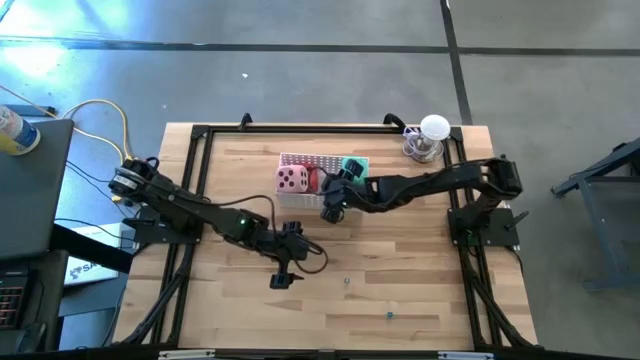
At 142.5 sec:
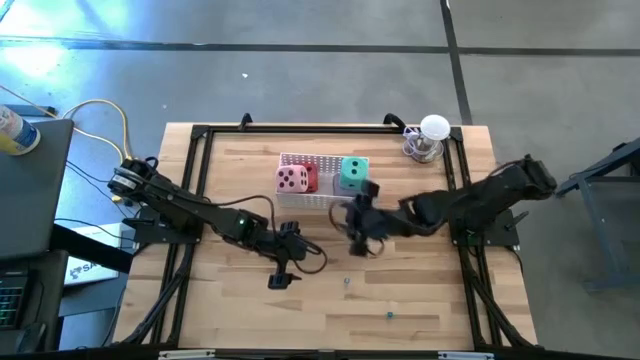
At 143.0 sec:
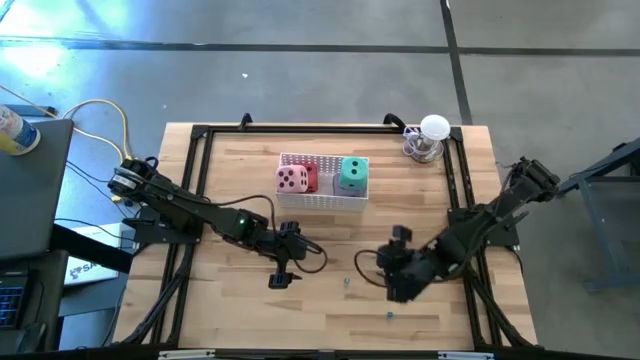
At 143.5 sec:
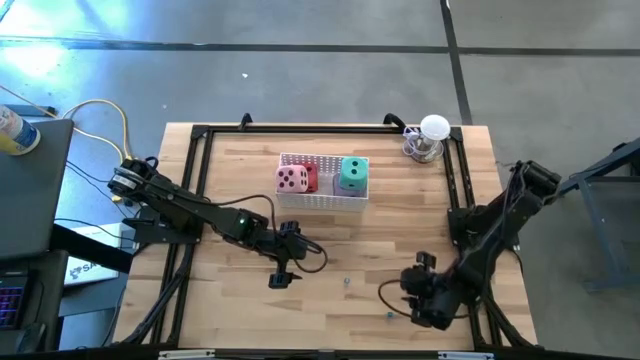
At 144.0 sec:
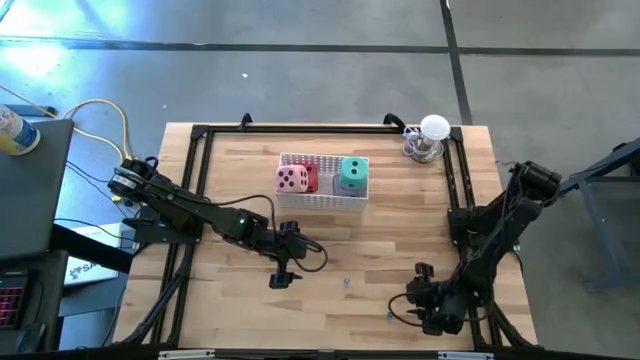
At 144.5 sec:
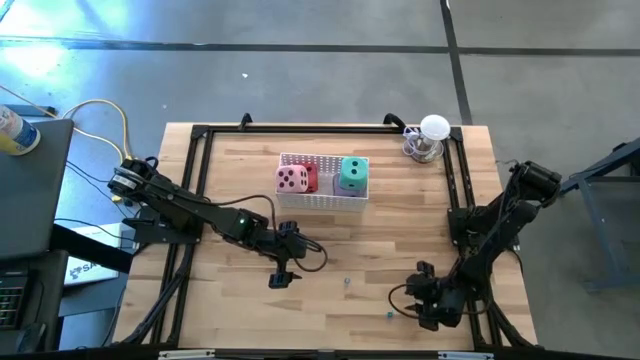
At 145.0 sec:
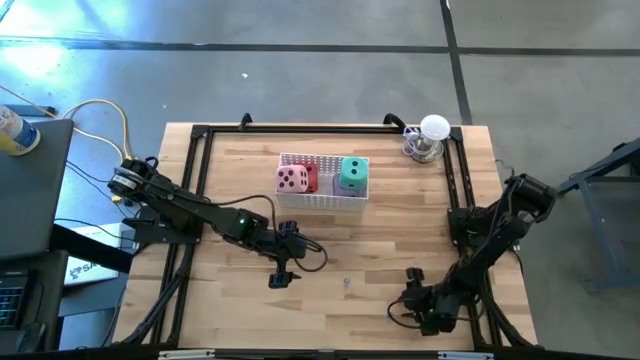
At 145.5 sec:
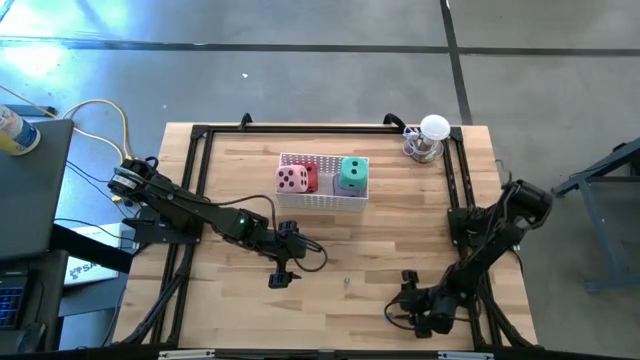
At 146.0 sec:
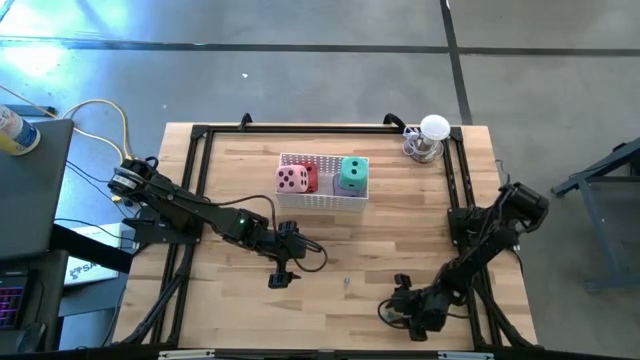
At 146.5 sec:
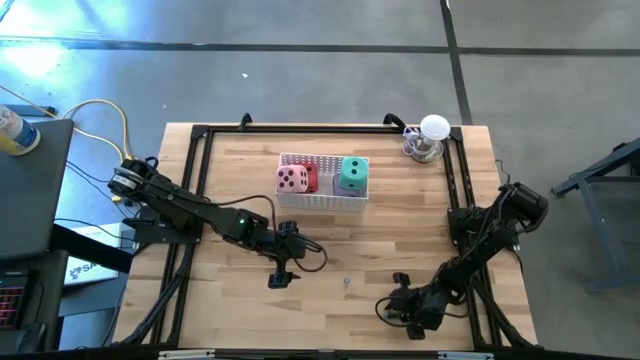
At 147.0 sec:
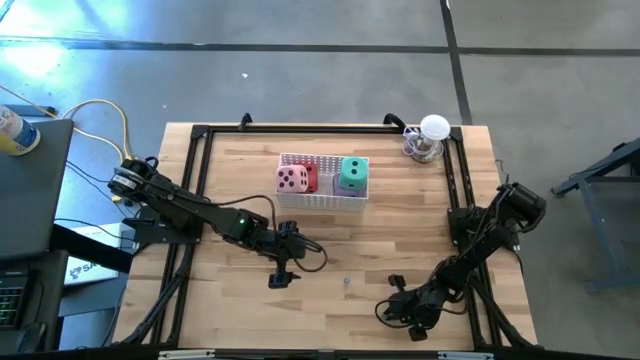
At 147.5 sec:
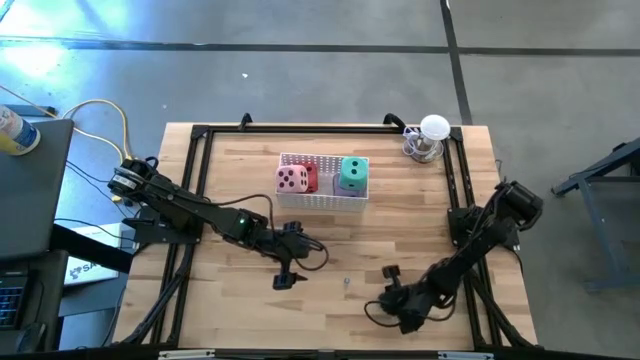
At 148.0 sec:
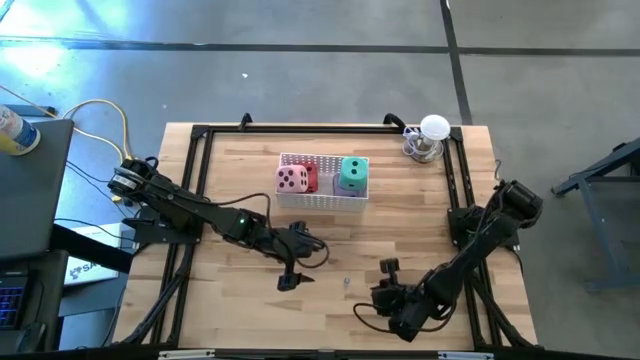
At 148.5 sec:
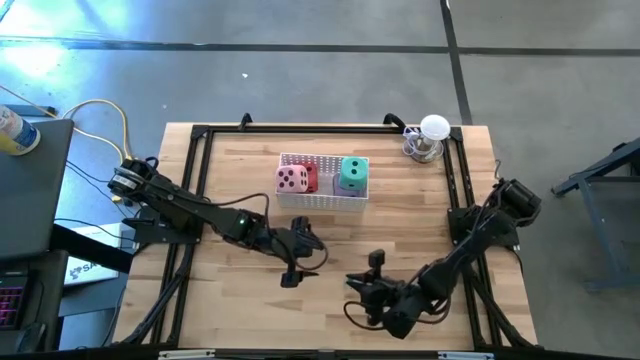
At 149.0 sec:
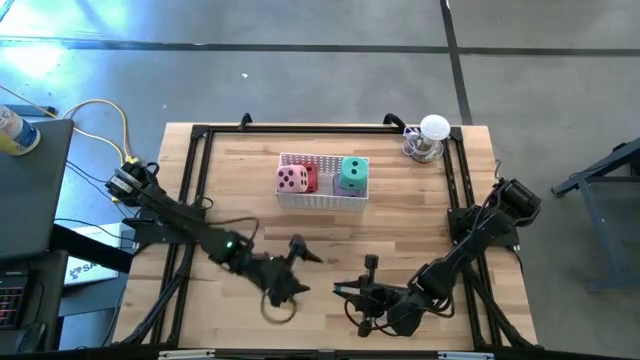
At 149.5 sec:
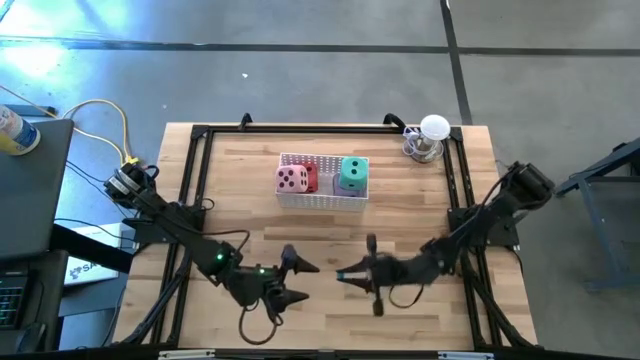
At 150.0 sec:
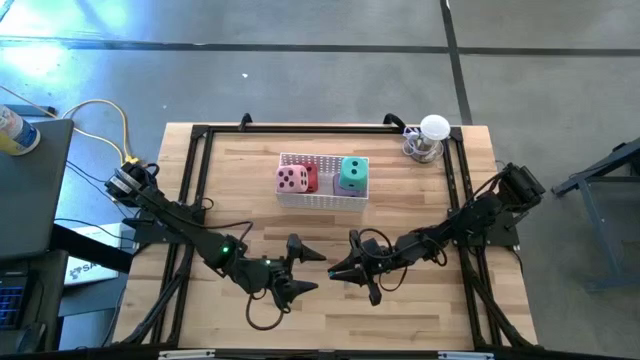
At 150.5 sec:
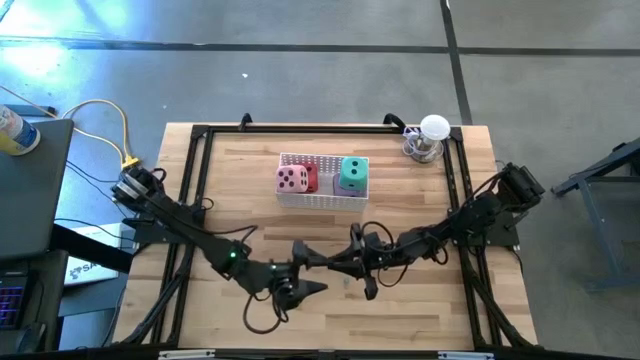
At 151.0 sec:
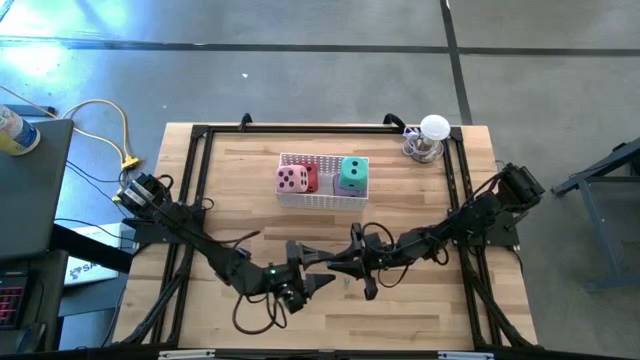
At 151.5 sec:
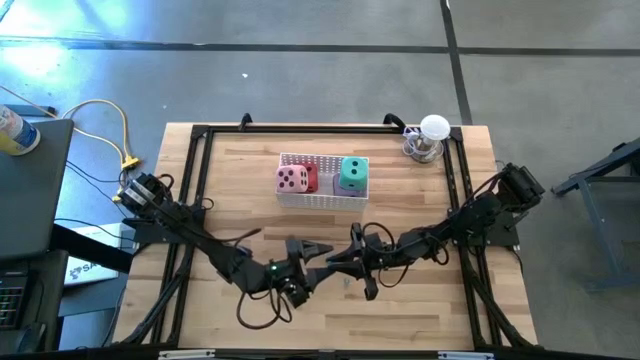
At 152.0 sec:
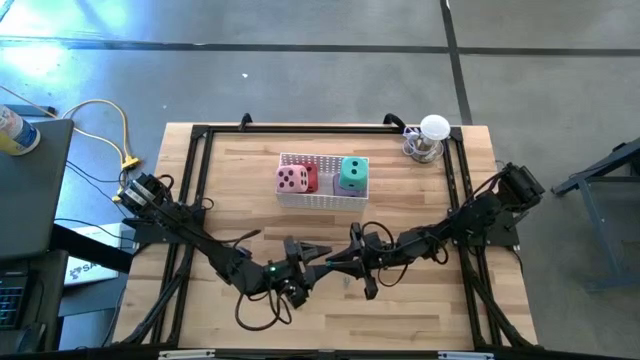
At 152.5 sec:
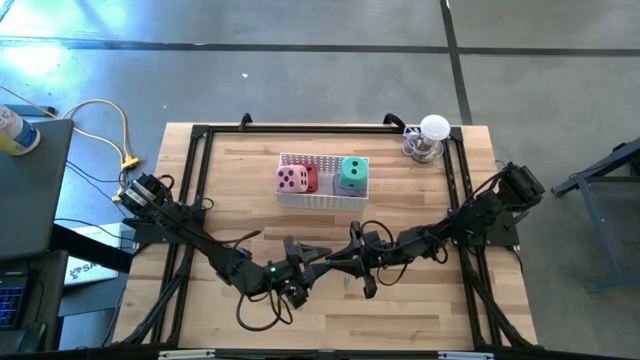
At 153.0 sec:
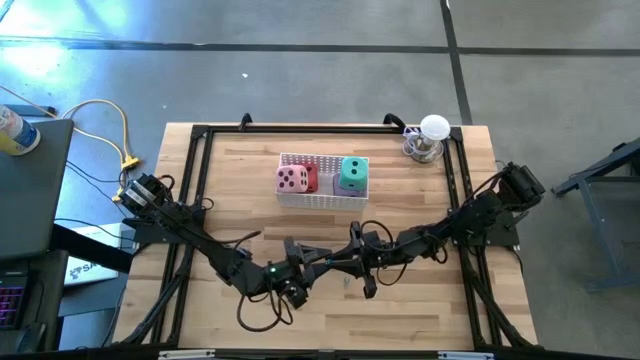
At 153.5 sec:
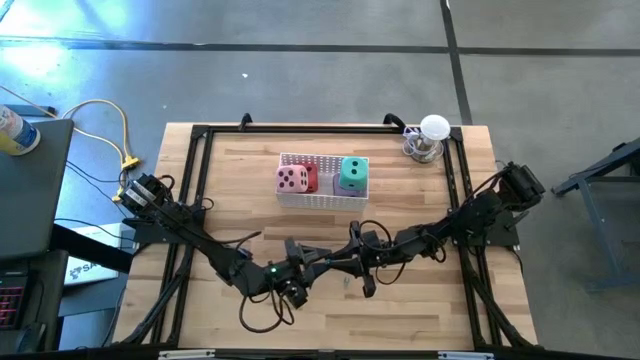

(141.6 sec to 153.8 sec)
Task: Pick & Place Dice
Put the small light blue die into the white bin

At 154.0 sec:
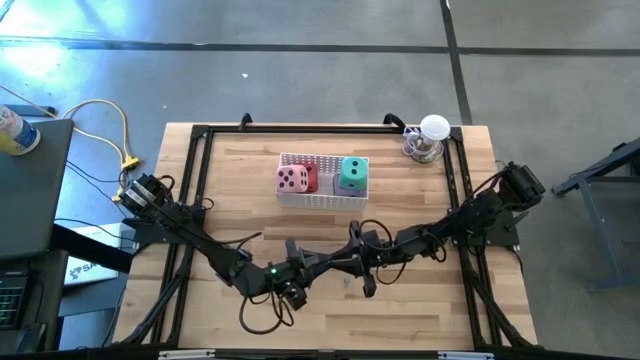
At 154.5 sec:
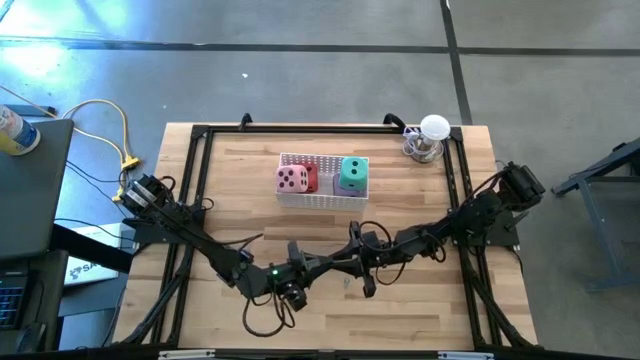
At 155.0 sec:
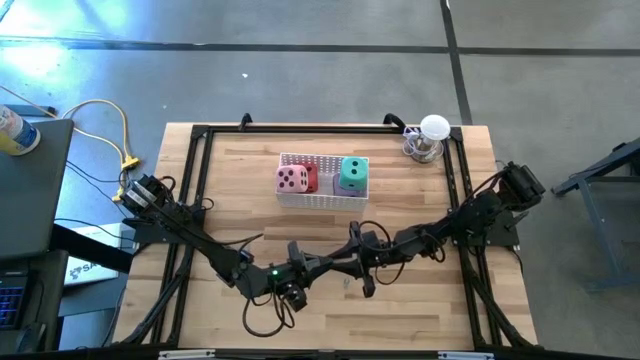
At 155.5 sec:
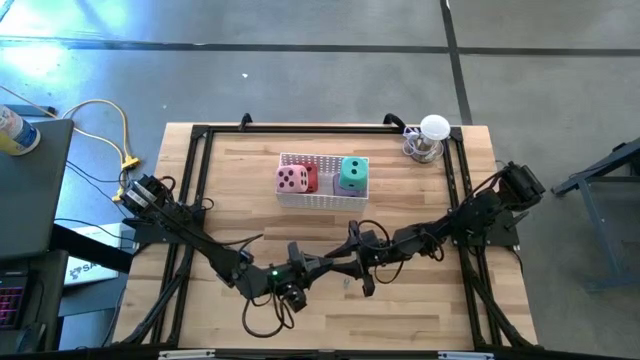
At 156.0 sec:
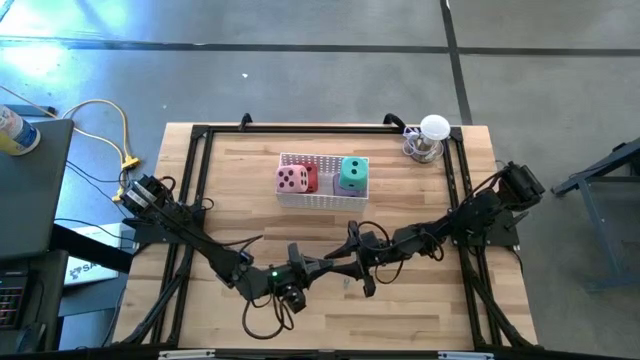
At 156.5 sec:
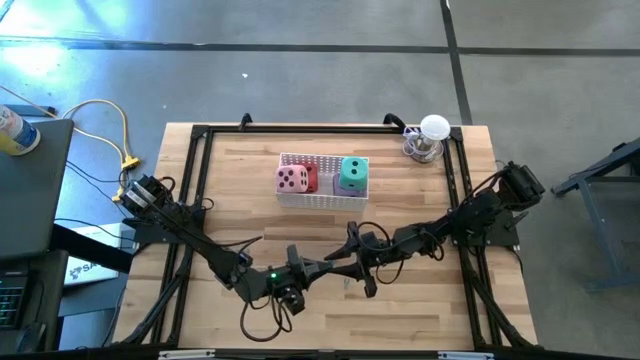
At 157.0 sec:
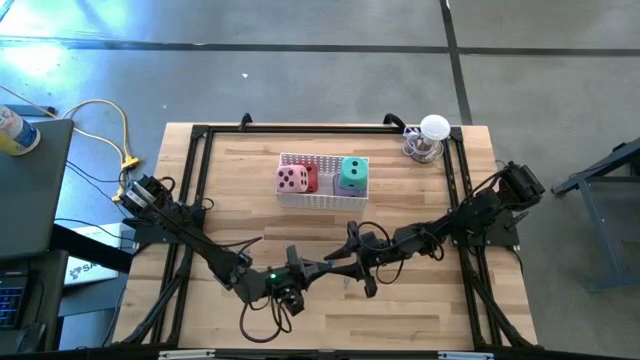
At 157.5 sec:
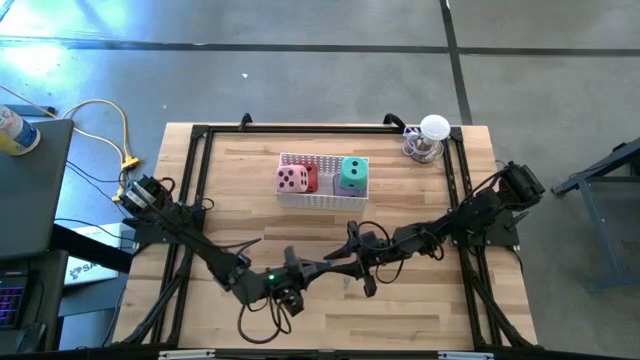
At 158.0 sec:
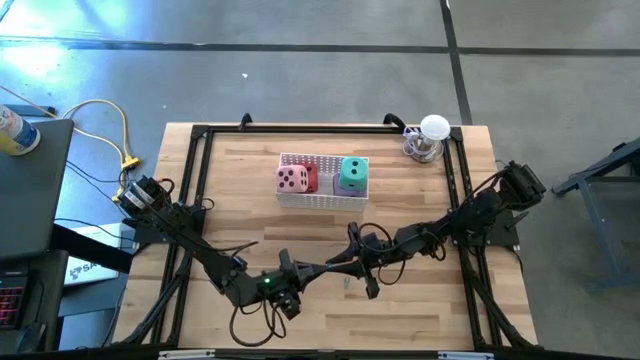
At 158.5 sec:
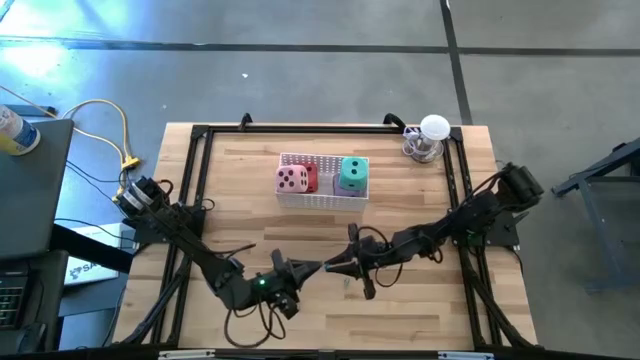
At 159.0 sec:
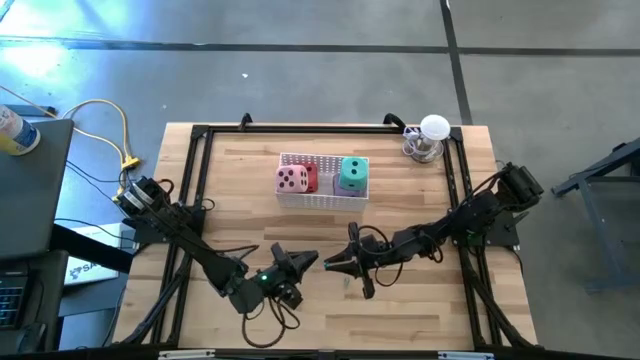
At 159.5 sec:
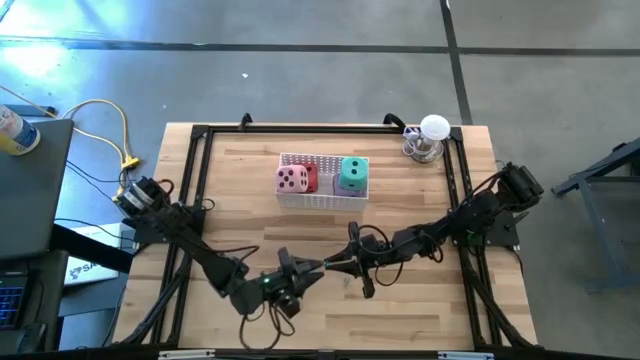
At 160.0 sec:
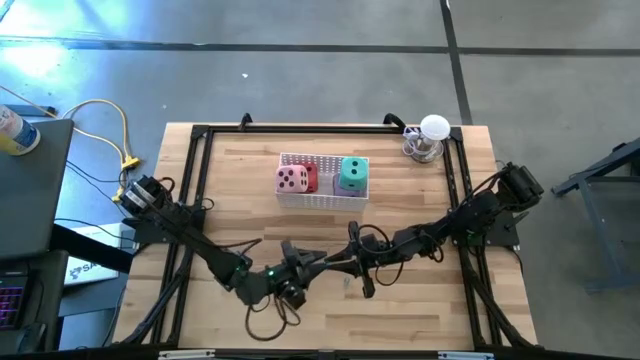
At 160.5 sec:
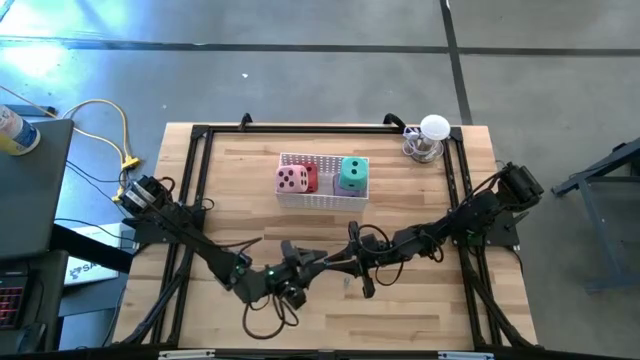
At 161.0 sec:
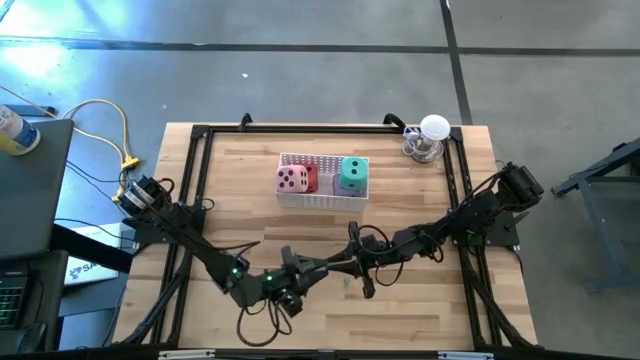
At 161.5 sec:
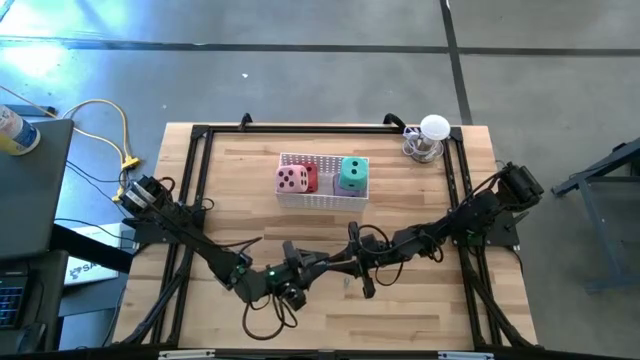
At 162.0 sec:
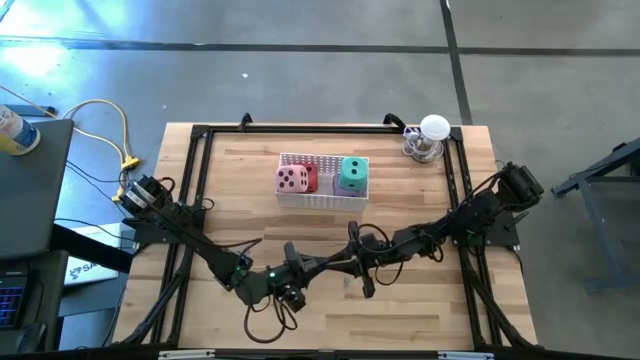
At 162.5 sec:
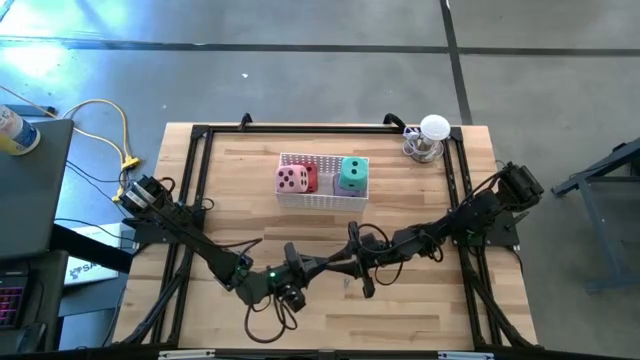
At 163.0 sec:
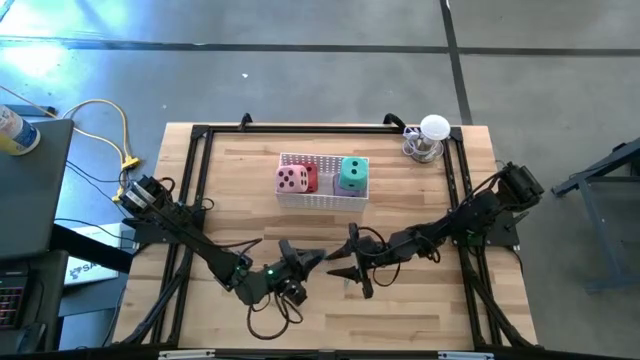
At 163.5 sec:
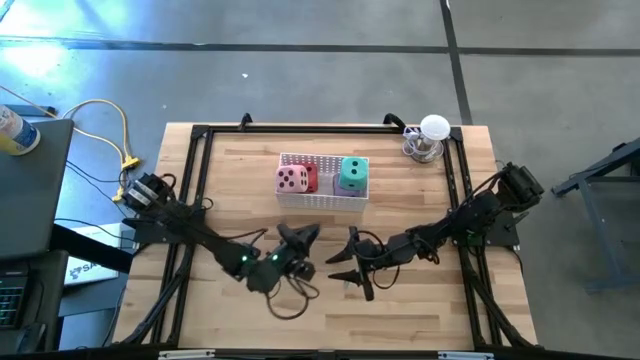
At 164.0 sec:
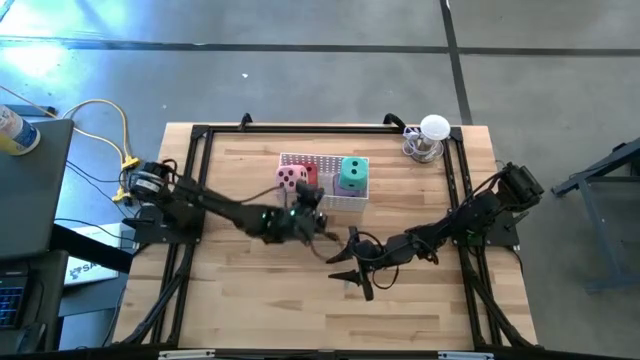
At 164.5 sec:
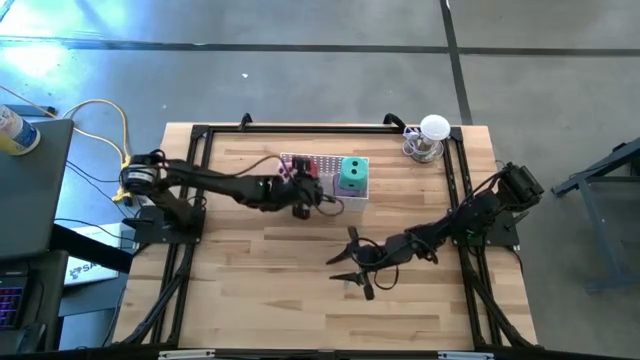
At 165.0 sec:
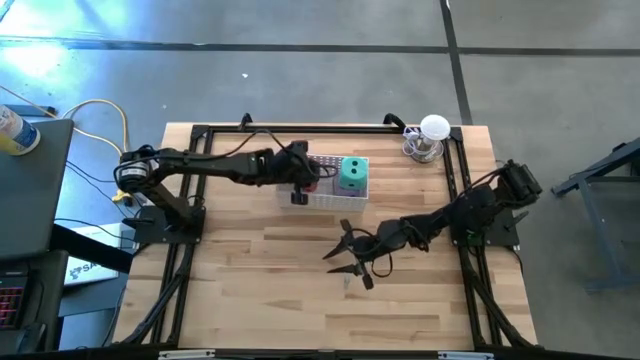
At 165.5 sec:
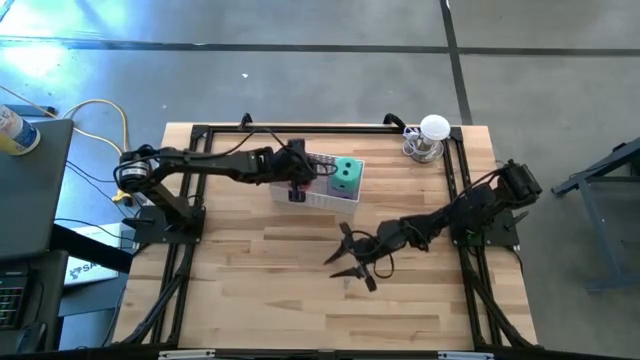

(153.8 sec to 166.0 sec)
Put the small light blue die into the white bin
